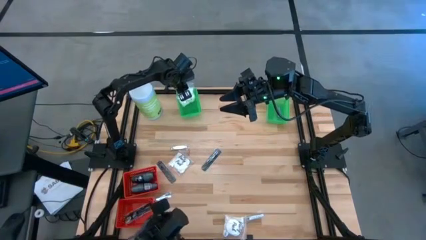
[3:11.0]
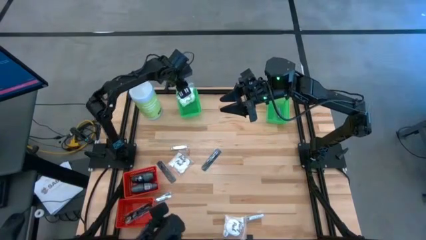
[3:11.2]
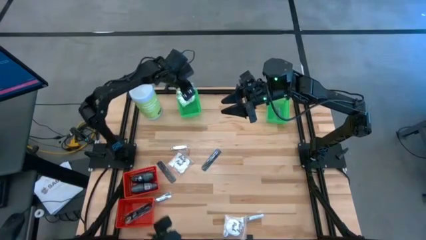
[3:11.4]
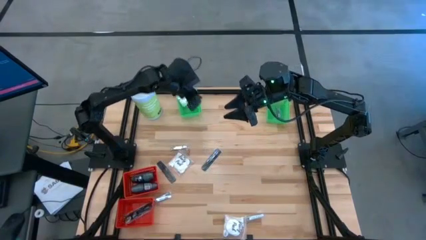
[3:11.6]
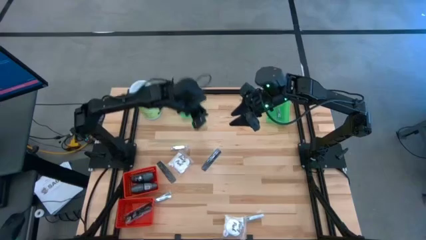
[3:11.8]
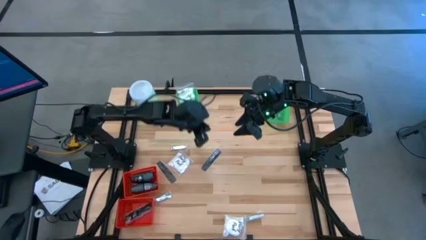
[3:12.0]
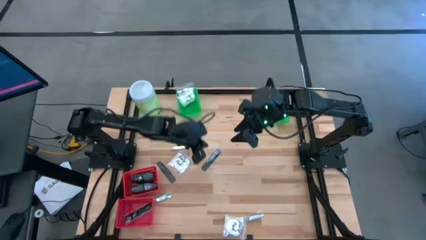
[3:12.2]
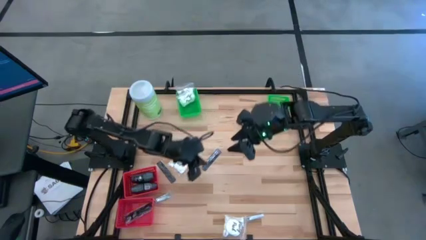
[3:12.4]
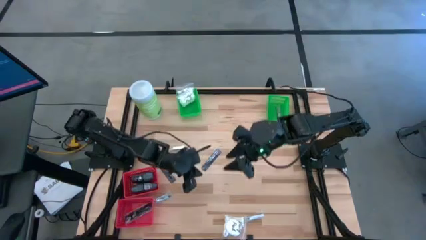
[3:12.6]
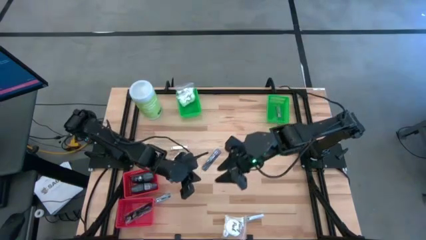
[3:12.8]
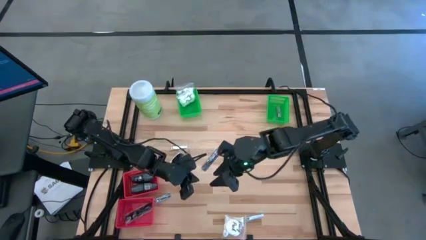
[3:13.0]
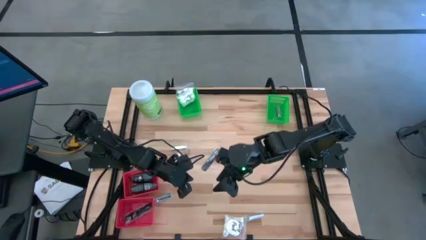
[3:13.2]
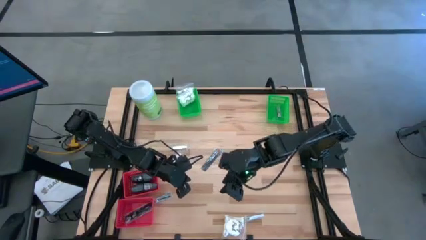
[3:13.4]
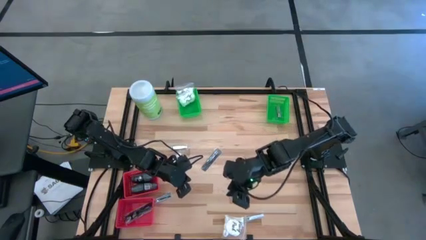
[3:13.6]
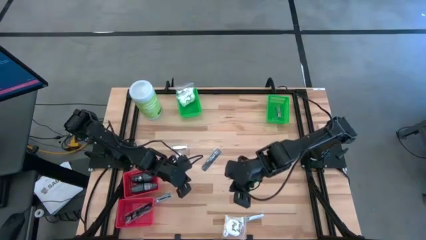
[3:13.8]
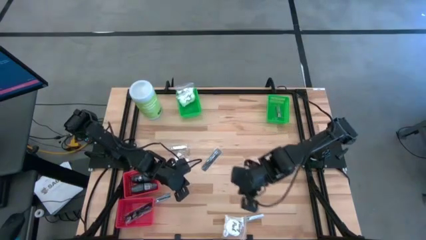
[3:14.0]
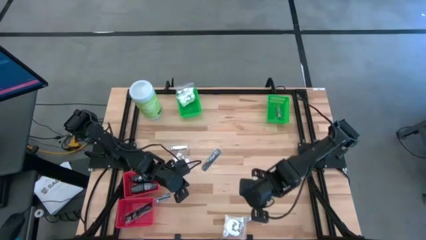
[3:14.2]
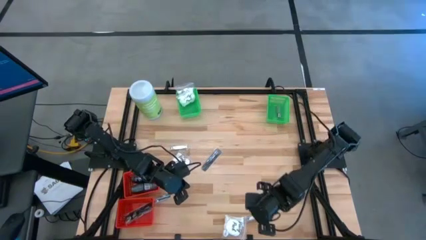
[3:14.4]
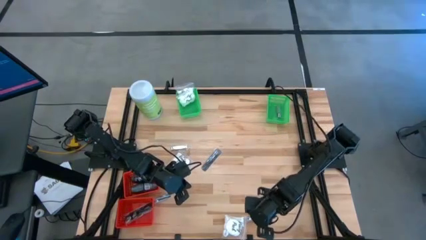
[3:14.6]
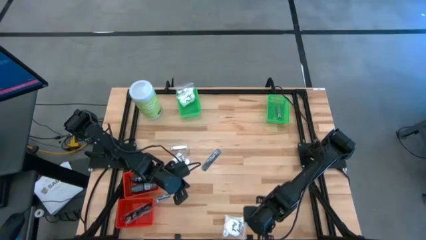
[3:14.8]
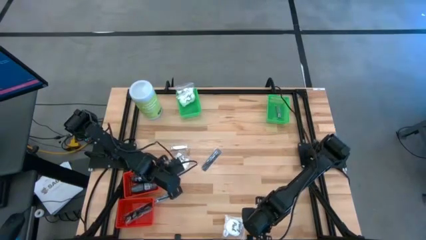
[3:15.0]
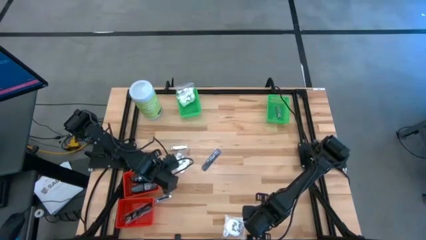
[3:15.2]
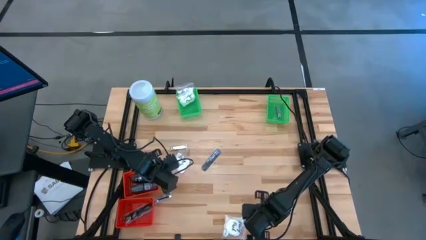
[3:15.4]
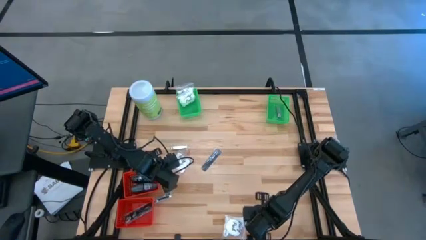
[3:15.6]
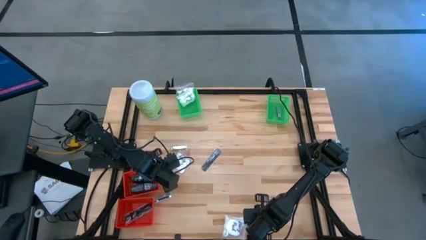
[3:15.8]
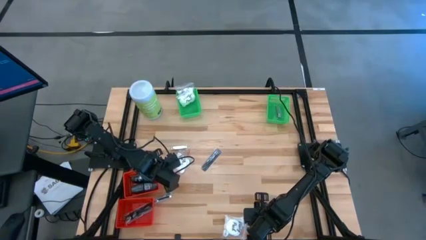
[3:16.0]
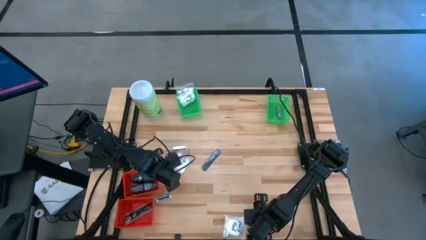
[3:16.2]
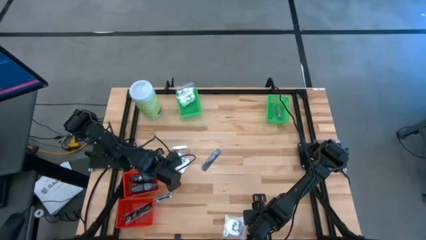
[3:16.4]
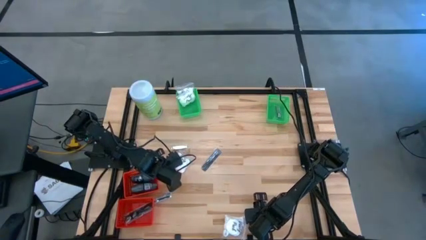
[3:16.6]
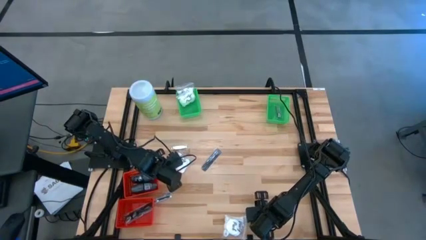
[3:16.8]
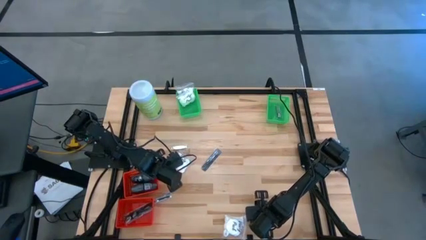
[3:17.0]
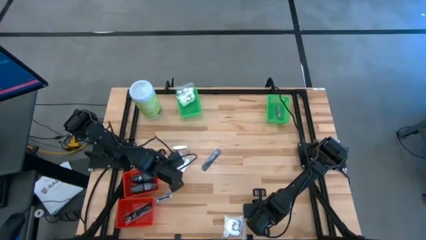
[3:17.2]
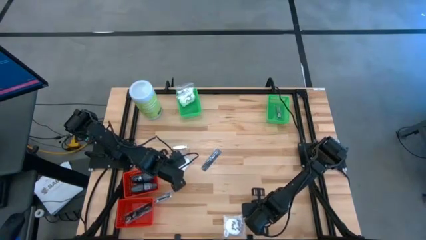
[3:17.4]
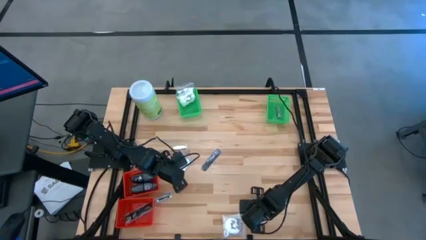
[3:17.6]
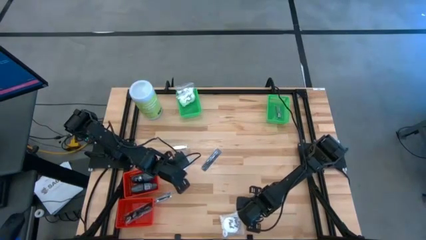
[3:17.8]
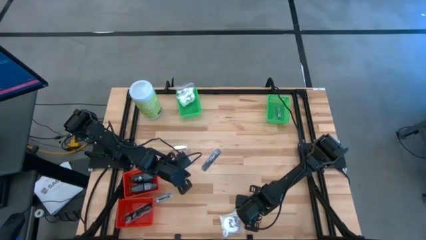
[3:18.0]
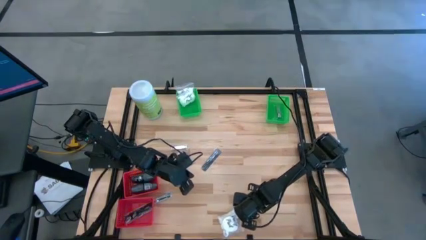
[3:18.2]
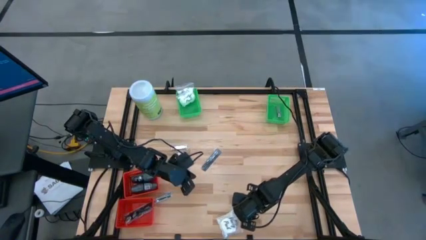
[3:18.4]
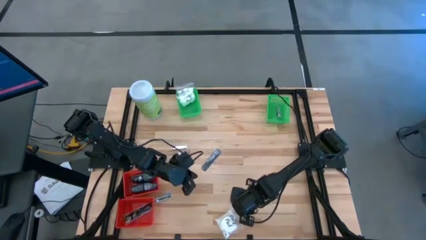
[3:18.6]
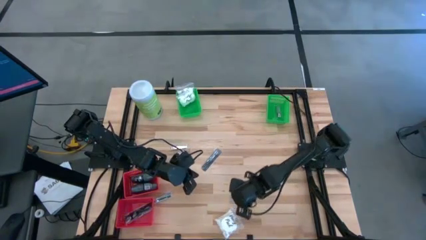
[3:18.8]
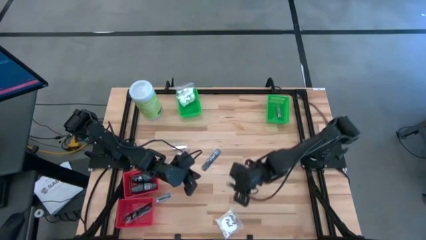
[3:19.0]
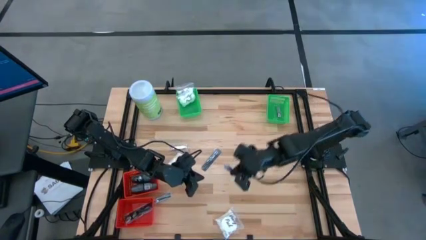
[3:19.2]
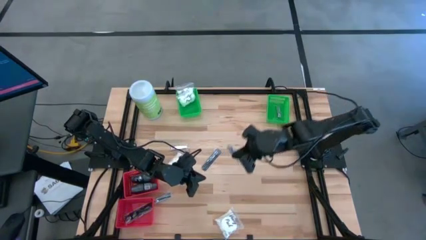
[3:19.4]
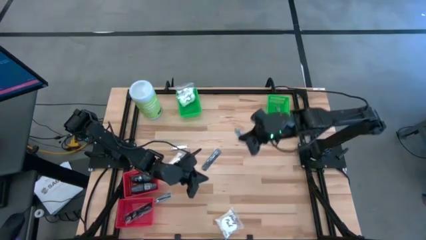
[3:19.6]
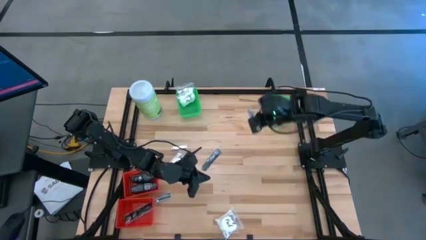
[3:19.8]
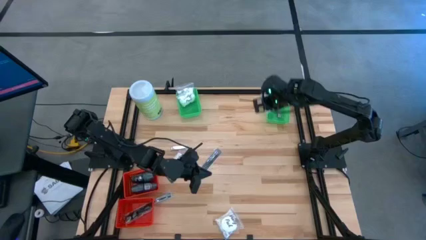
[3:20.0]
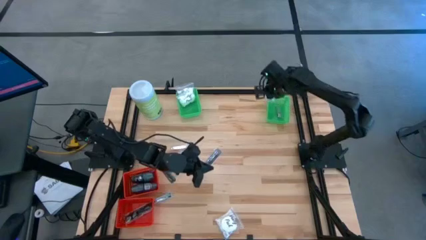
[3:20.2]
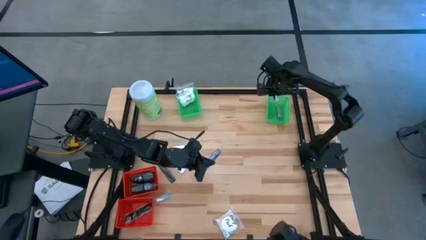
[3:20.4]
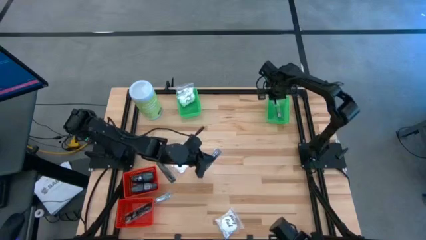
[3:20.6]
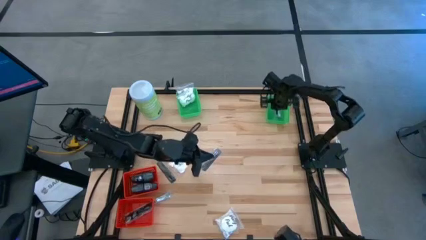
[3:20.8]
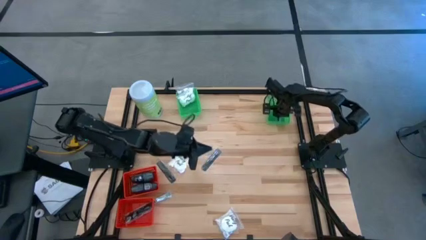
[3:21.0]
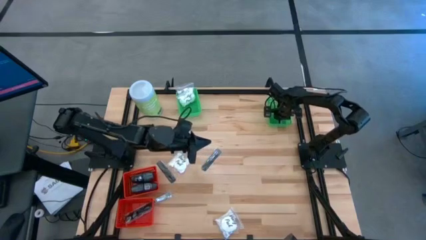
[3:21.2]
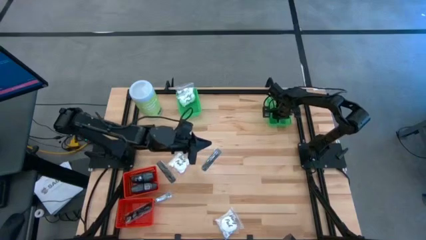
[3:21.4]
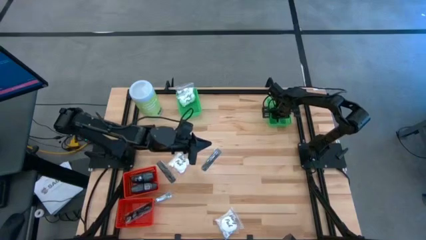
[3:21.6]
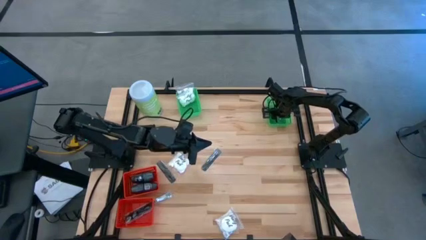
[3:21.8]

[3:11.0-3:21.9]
Task: Pick & Place Travel size toiletries
Put the silver nail cutter into the top right green basket

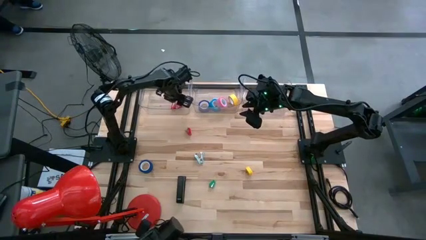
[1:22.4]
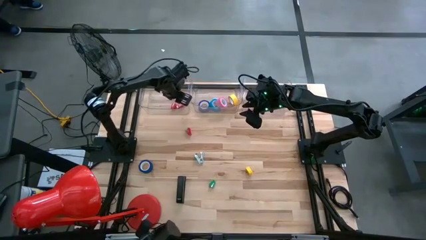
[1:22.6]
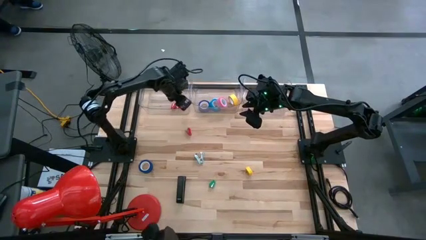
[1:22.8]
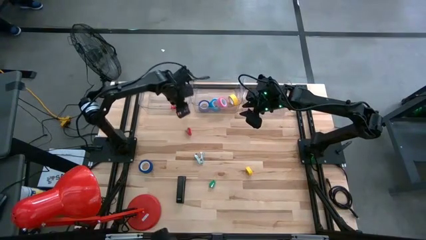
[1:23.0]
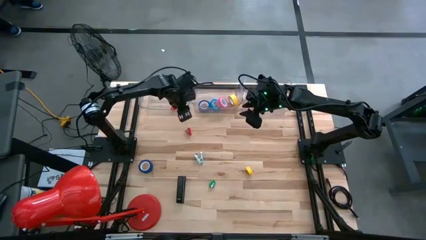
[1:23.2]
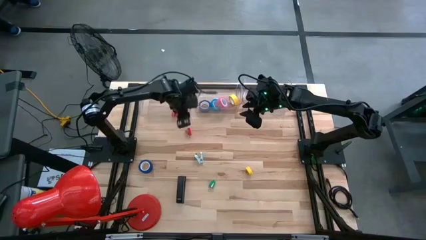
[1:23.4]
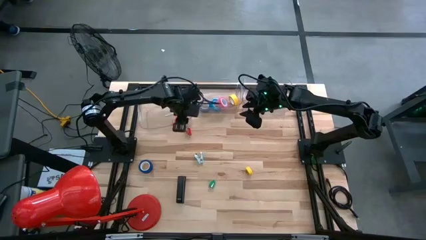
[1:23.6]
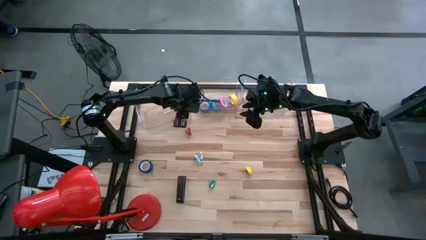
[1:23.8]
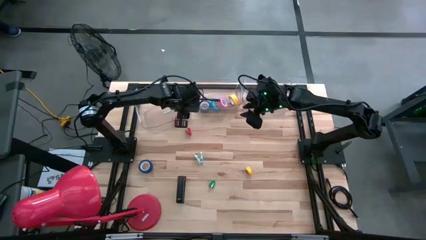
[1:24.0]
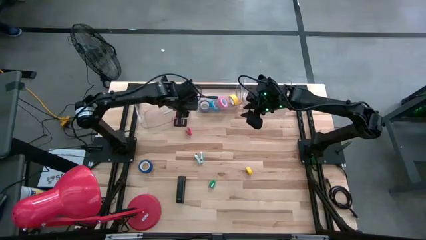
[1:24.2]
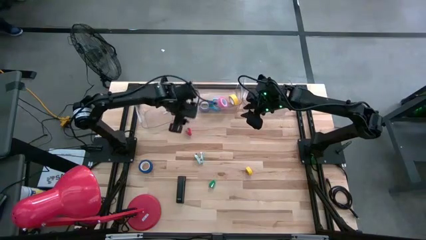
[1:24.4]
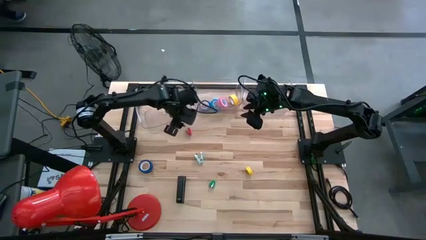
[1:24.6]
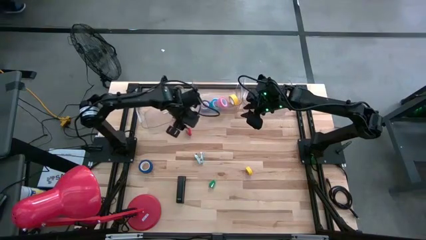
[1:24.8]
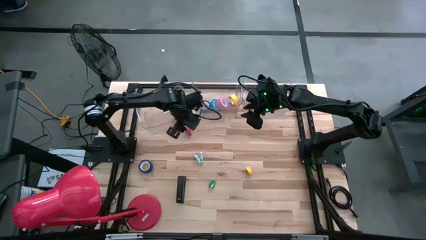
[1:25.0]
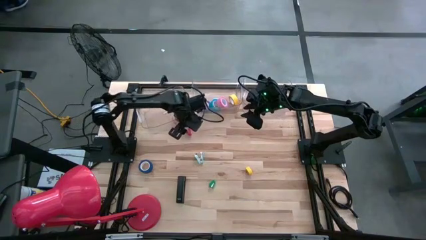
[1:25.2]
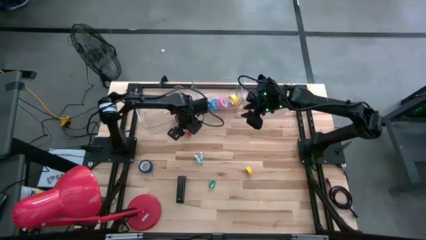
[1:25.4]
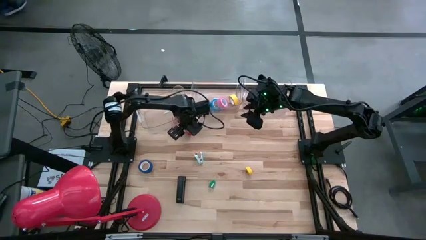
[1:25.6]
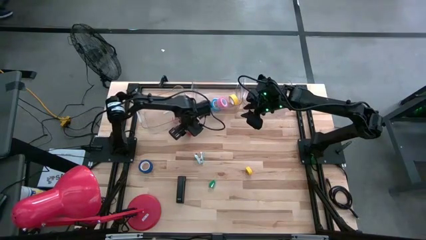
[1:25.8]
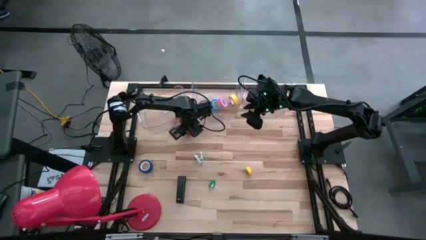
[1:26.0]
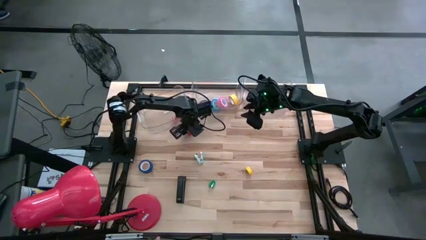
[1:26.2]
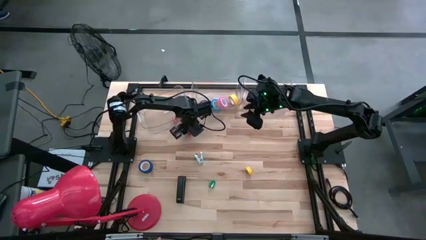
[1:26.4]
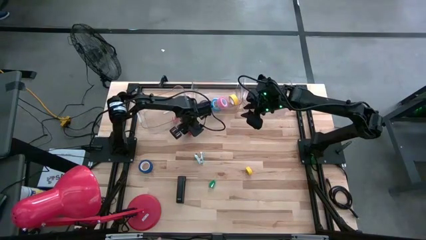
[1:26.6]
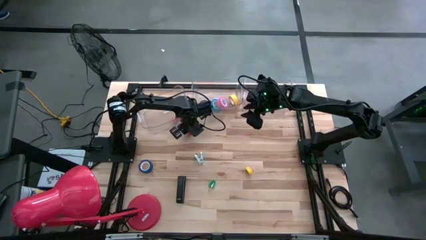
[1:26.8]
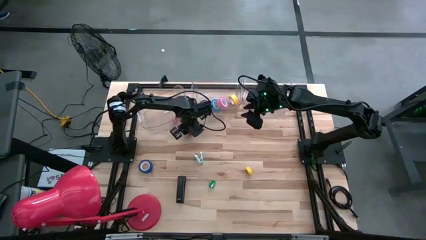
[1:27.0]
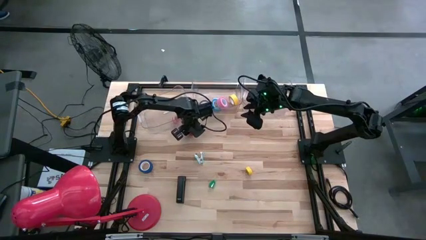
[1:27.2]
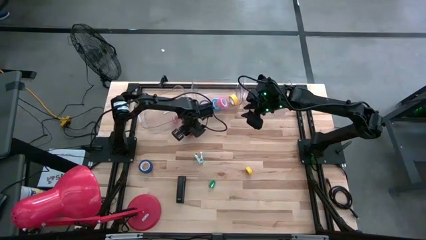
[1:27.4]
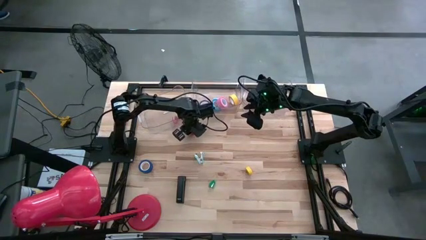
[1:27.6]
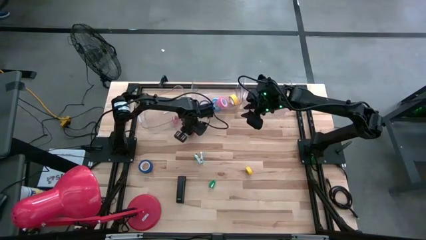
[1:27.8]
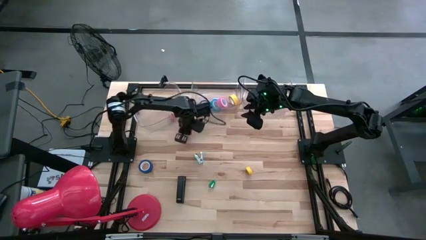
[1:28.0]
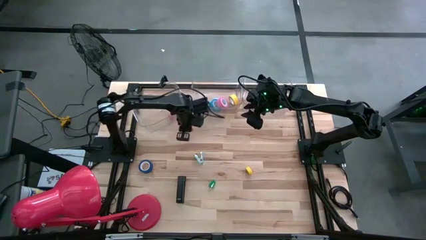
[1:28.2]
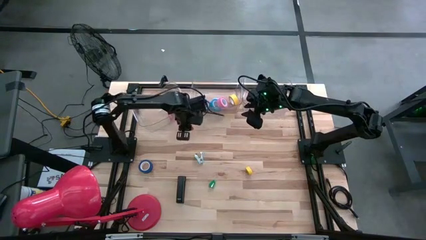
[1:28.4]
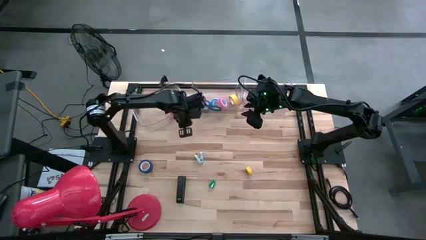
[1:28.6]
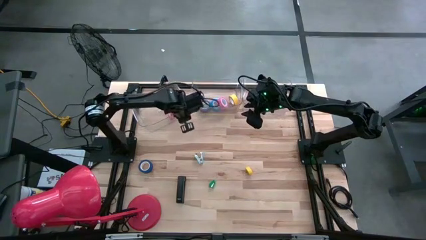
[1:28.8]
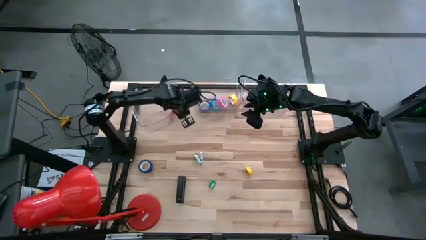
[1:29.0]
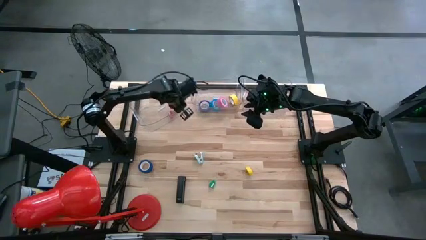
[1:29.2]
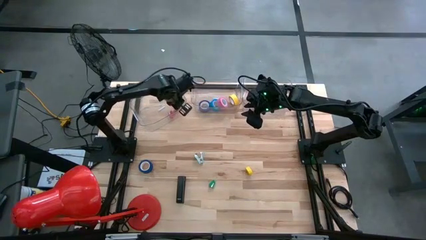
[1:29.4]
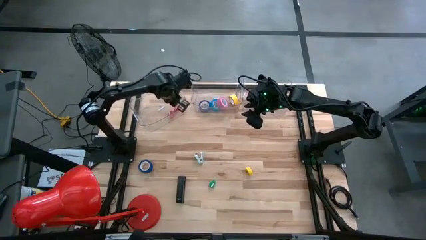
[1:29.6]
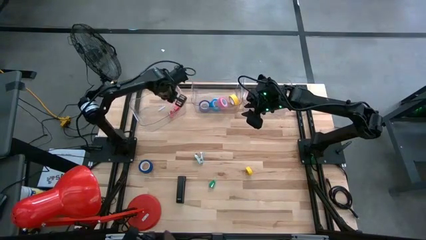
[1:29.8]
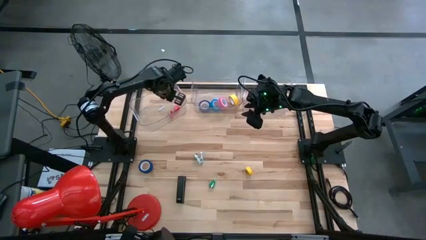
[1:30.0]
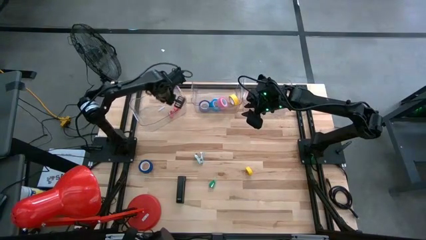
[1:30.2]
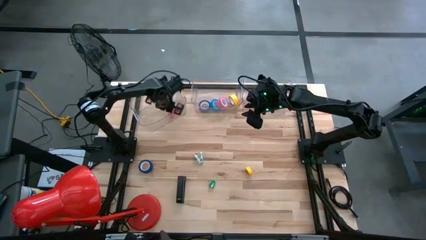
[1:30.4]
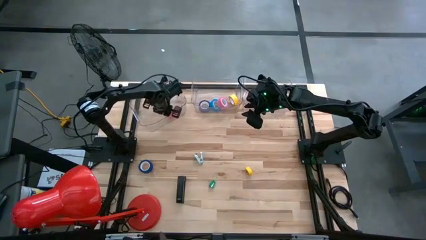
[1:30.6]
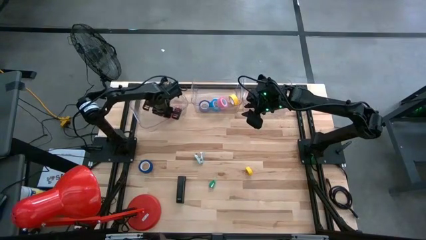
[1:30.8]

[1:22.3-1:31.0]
Task: Pick and place Stapler, Stapler remover, tape
Put the red stapler into the left transparent bin
